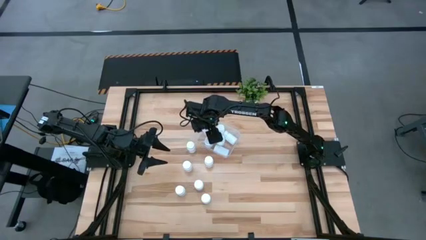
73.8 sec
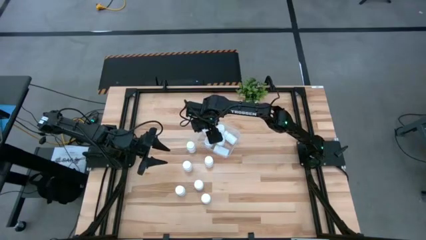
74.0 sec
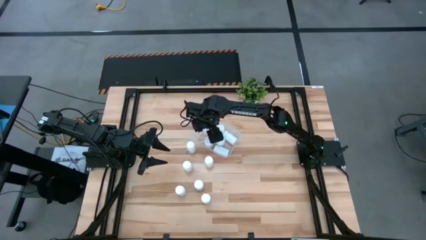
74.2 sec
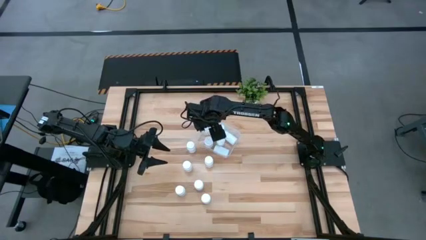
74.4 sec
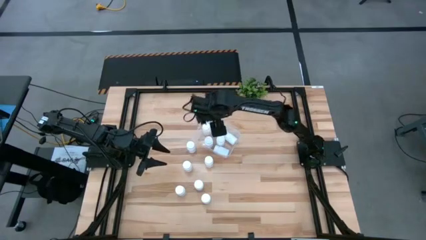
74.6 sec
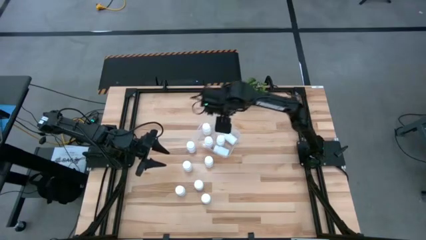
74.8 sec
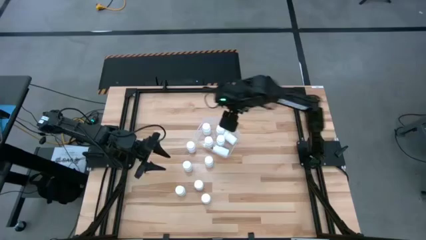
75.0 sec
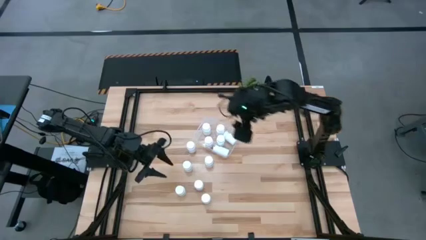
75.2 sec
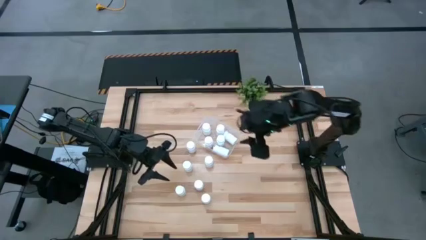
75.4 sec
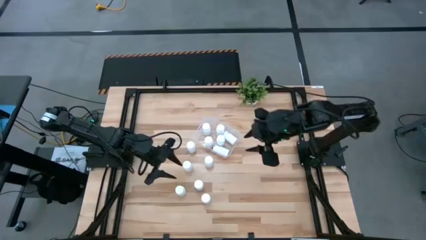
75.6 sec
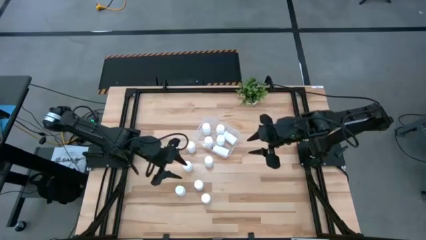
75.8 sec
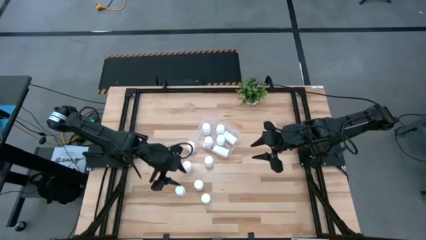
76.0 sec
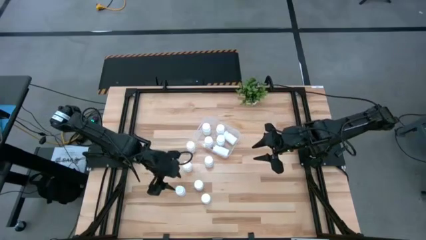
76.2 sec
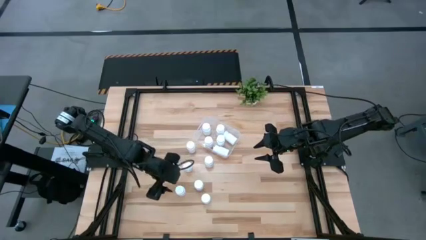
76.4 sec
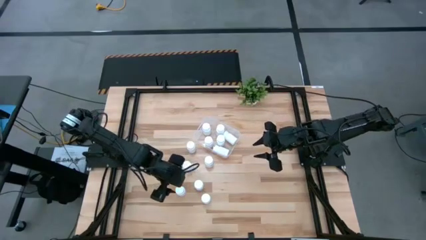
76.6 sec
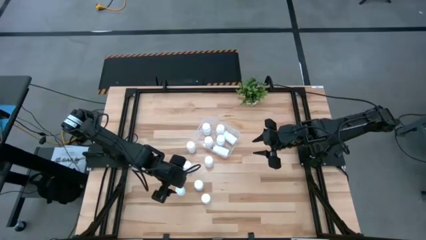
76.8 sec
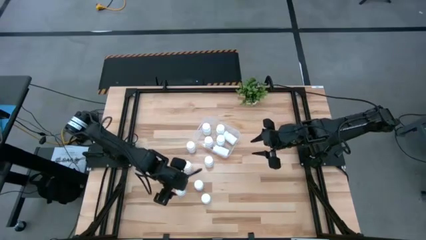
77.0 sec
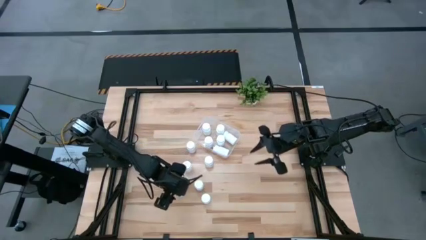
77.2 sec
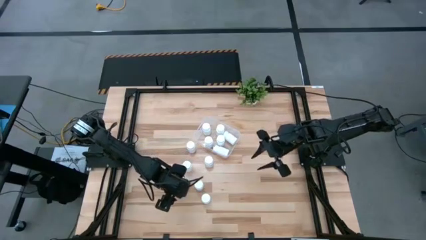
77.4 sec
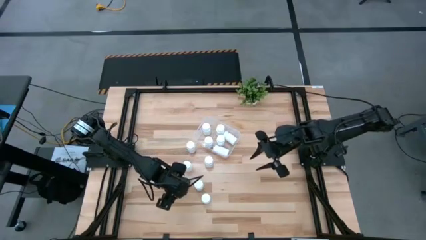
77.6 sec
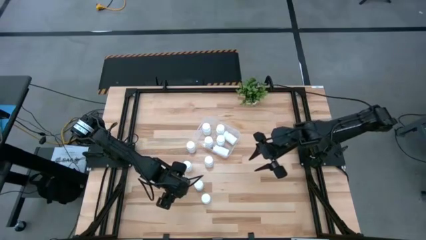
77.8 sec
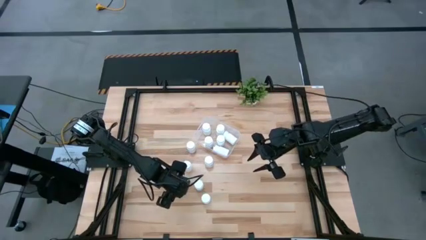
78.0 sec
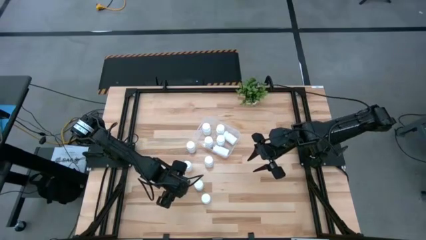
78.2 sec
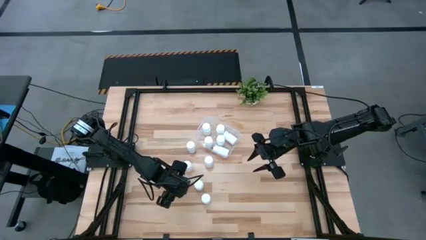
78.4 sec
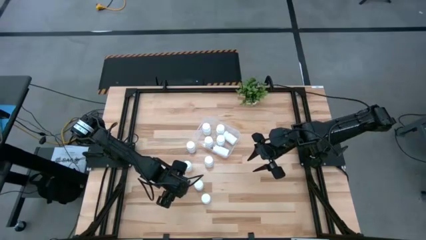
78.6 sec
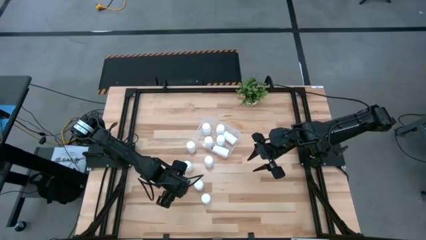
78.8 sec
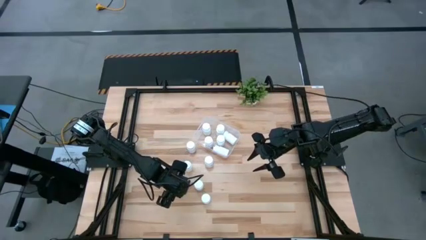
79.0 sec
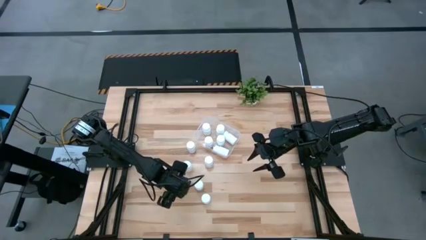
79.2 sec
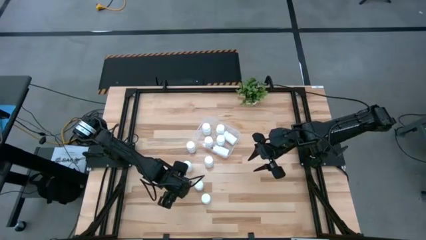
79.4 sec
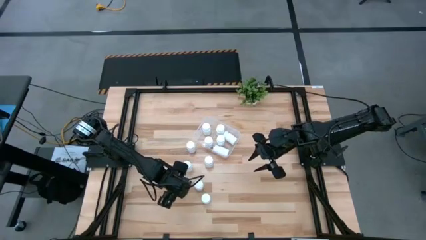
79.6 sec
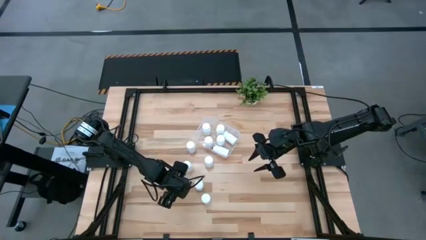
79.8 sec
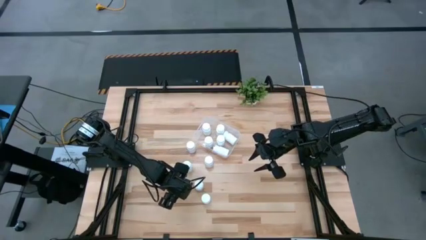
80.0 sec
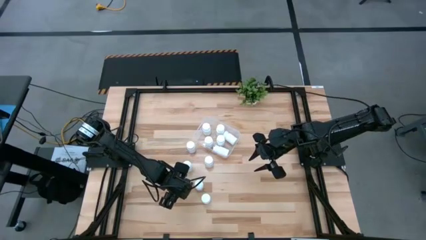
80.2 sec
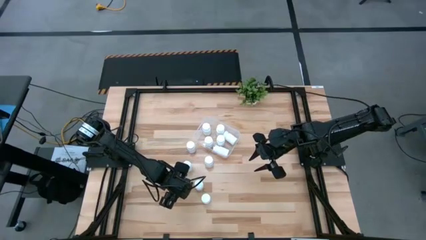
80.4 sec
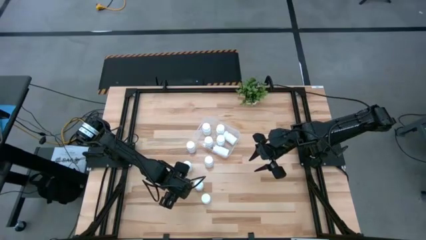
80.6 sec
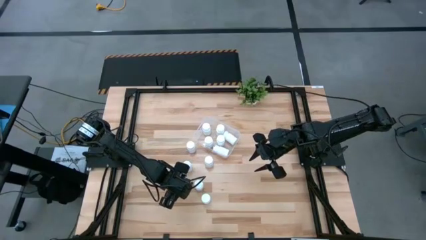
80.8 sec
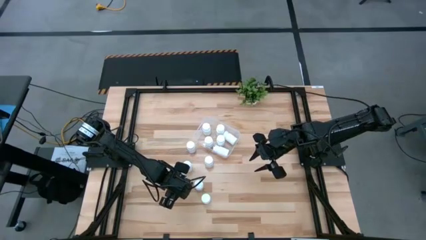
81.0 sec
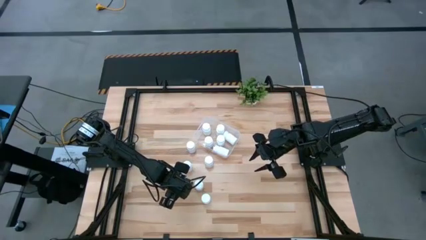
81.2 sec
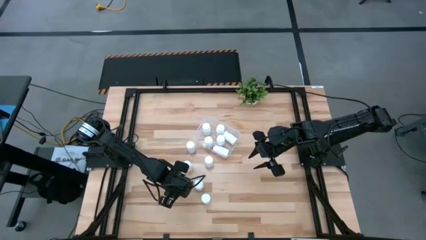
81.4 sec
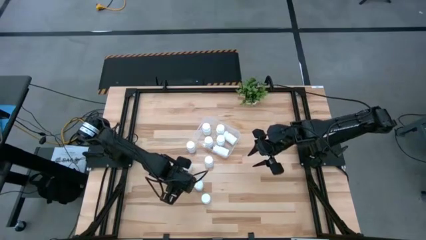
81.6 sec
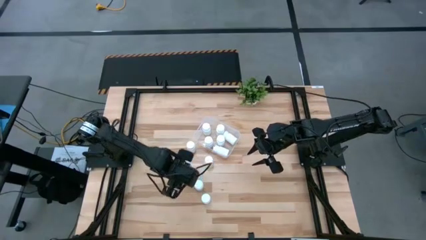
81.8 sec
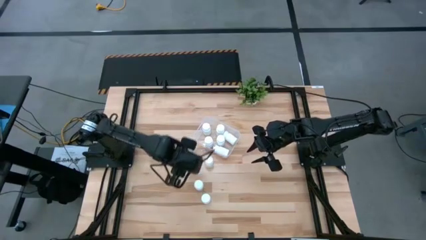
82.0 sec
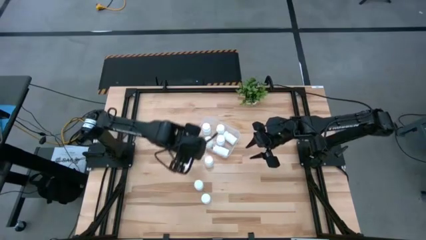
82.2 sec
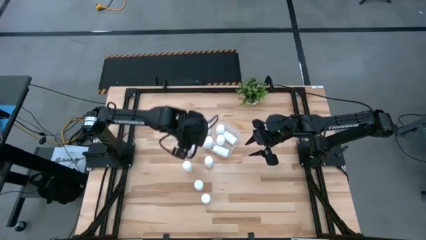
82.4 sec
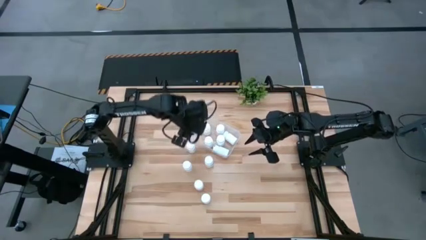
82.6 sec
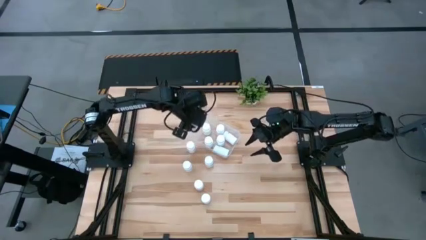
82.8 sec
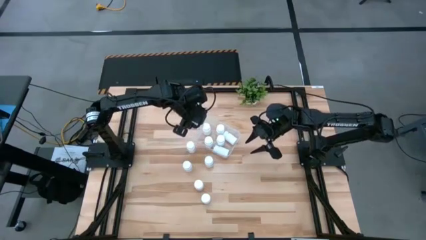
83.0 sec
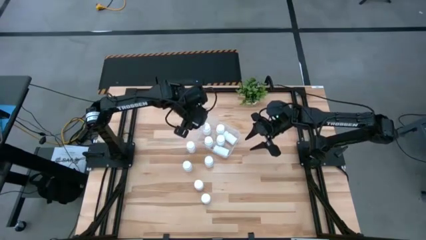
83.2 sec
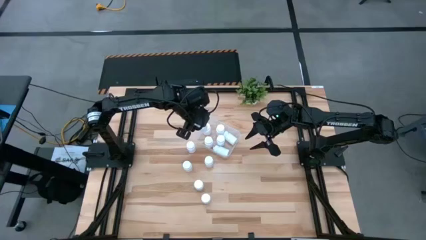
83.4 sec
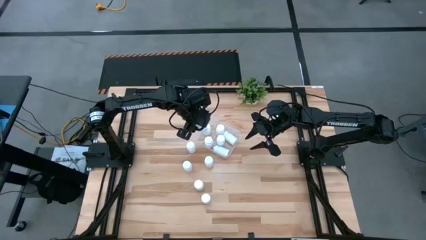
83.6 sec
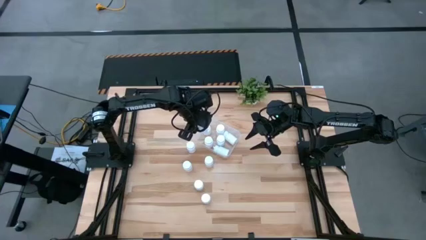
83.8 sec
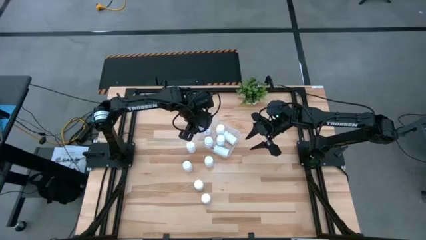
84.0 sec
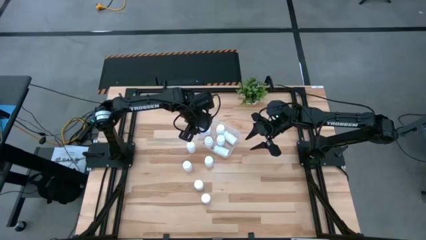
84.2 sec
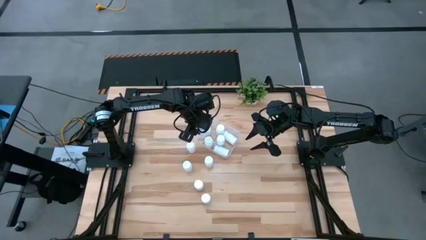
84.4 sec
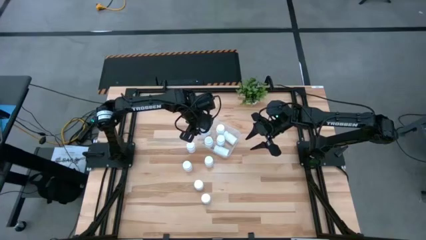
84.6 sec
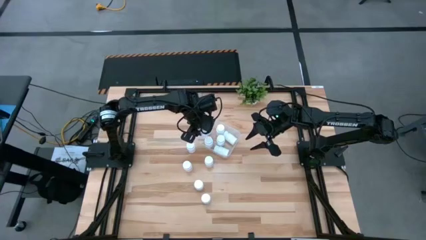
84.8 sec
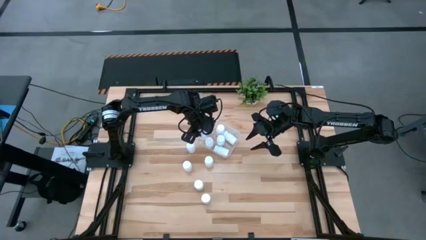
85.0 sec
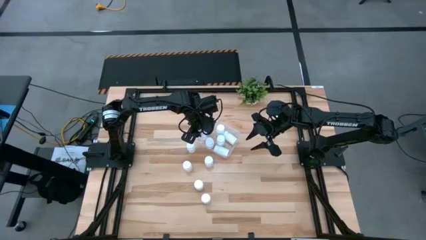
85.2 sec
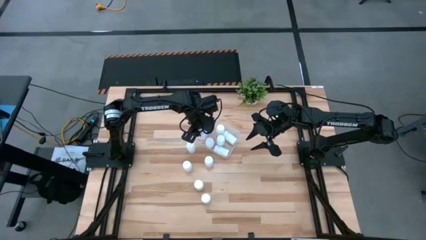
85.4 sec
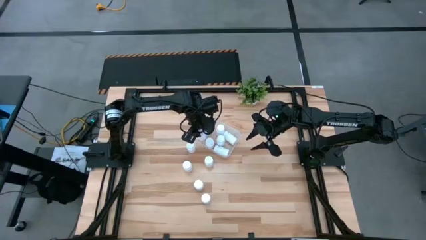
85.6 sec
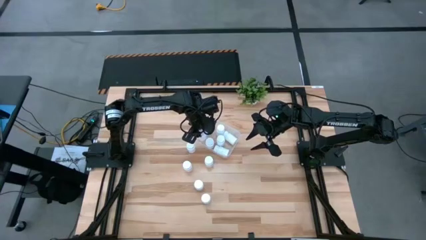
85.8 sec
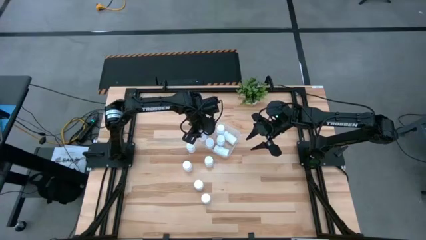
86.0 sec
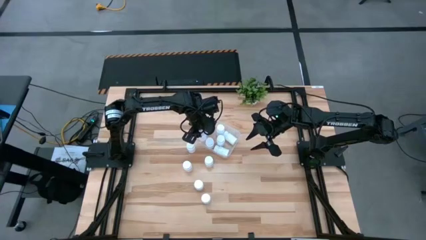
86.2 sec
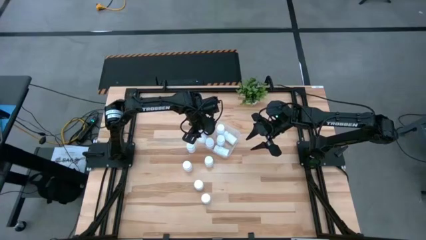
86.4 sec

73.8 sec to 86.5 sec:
Task: Pick and place pill bottles into a basket
Put the pill bottle into the bin

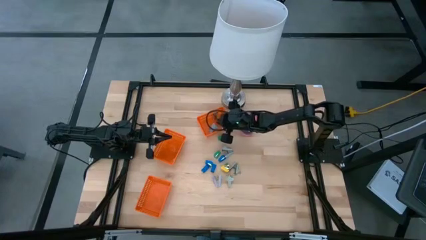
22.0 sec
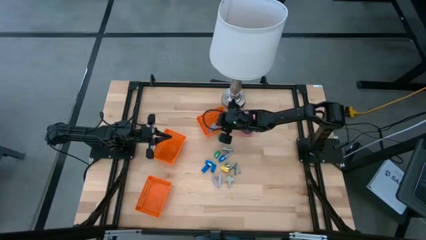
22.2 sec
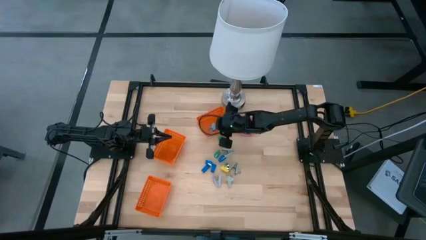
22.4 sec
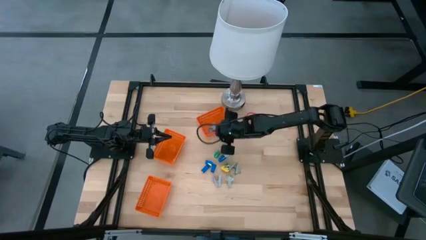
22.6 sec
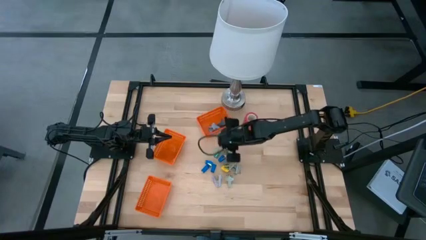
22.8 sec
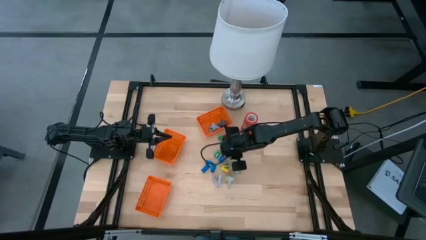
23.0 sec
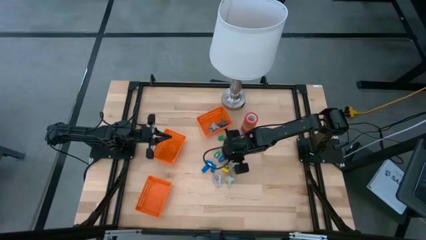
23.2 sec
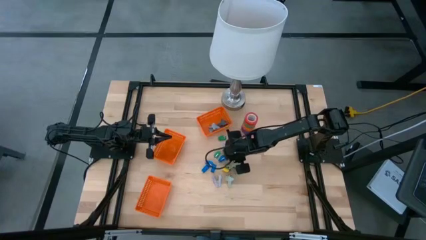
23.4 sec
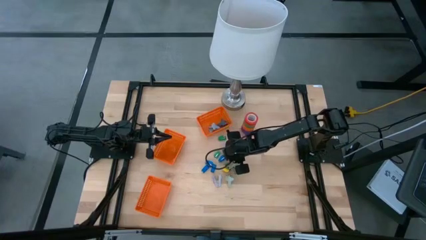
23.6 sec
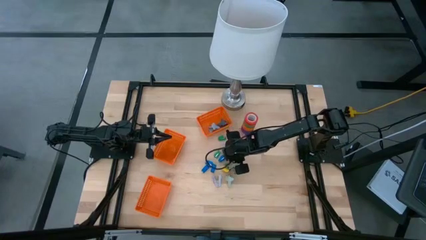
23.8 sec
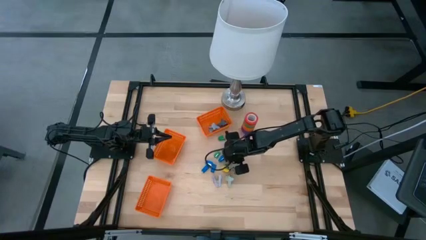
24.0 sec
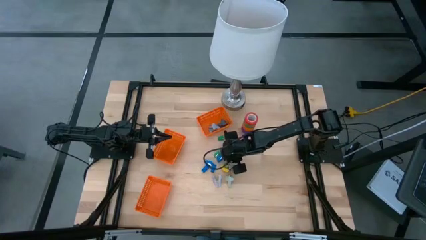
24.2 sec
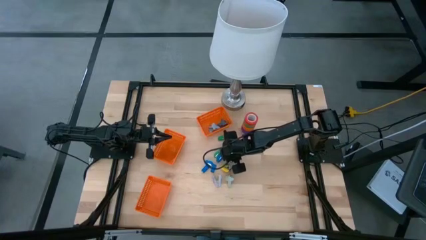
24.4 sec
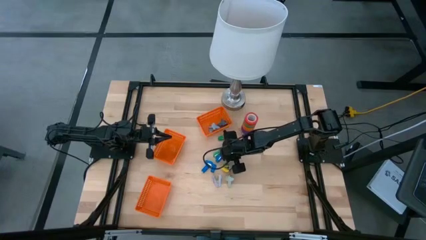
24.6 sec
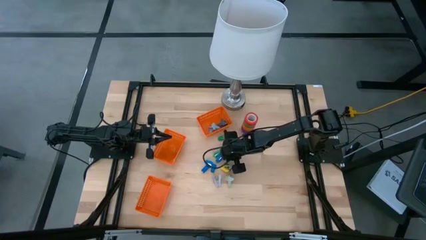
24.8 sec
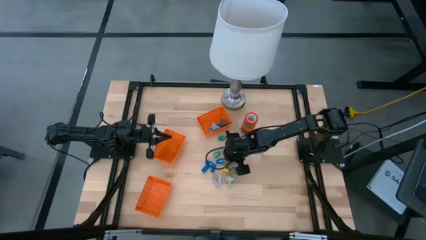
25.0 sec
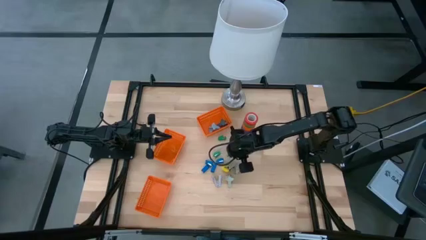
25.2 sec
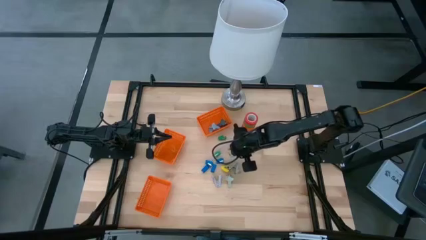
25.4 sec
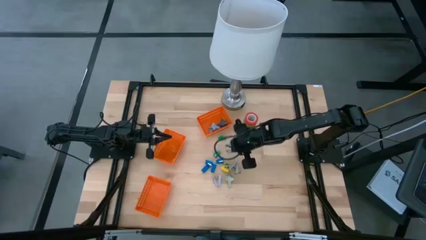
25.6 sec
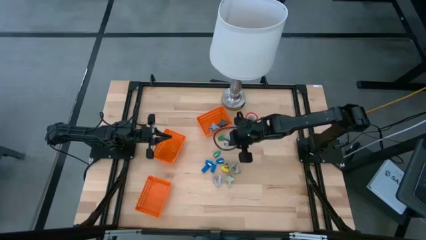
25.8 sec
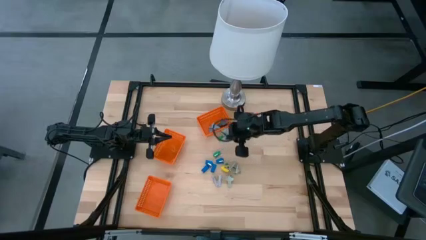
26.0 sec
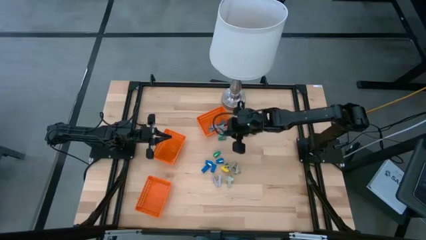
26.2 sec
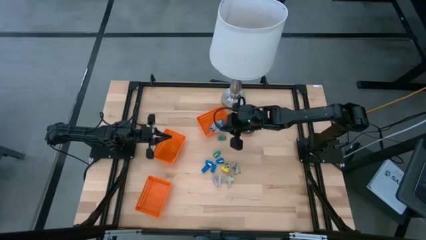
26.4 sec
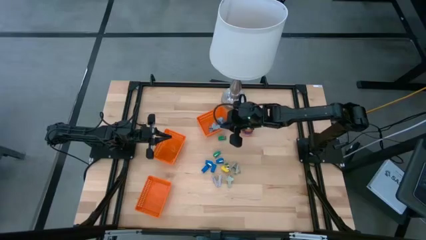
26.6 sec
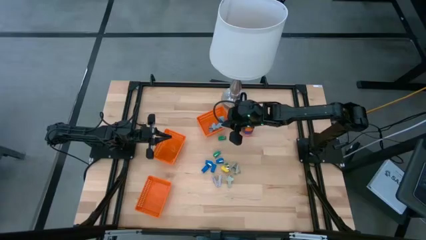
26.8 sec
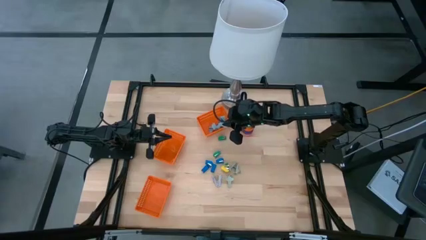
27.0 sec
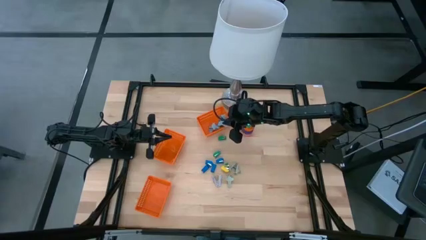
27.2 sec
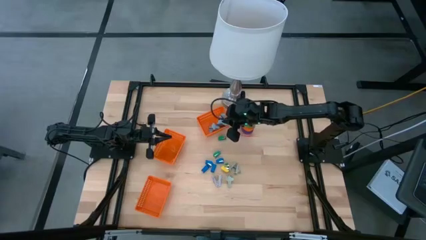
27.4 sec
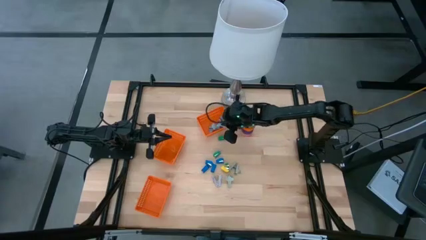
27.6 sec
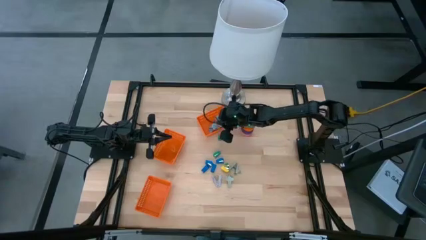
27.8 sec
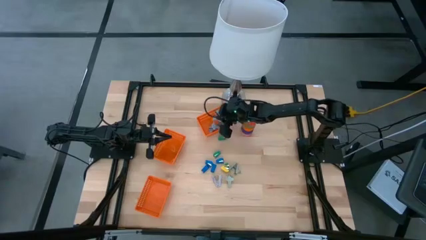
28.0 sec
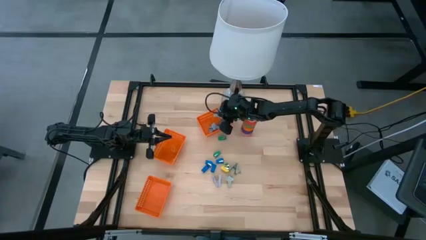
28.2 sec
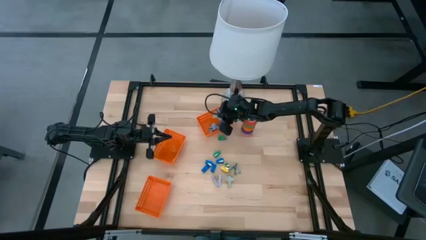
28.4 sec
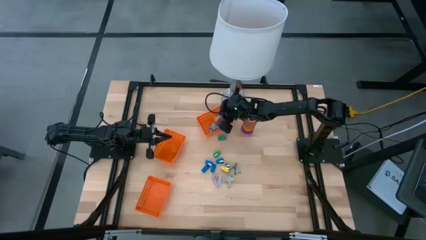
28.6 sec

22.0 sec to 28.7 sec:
Task: Pick and place Stapler, Stapler remover, tape
Put the light blue staple remover into the top orange bin
